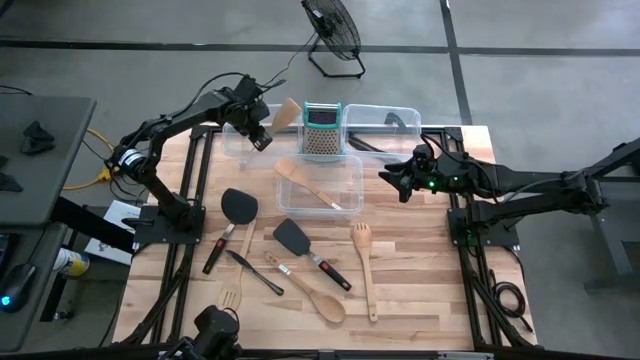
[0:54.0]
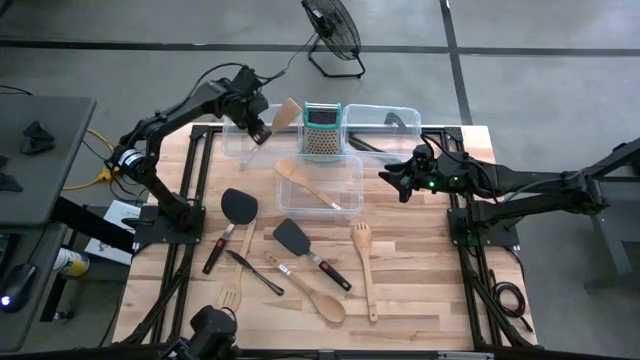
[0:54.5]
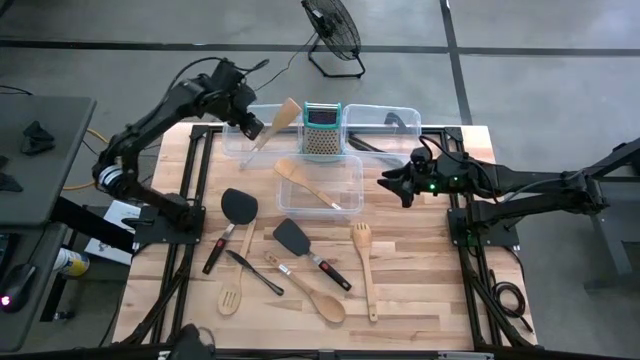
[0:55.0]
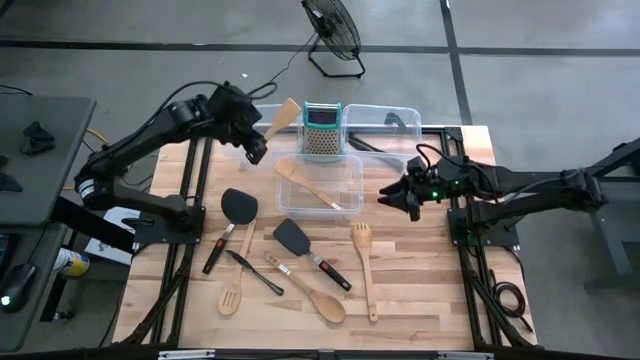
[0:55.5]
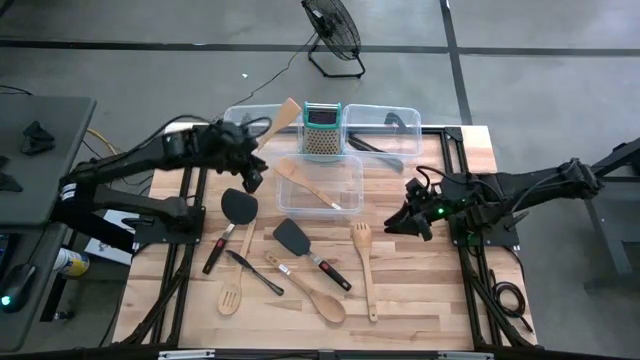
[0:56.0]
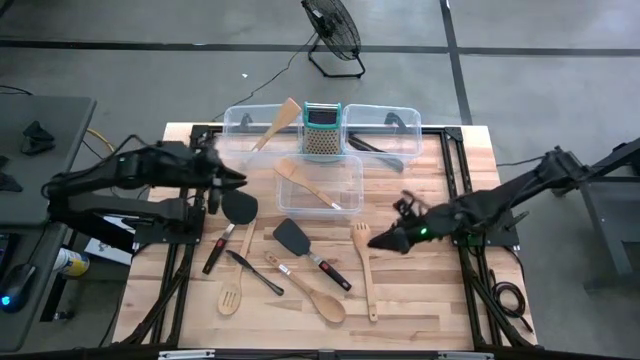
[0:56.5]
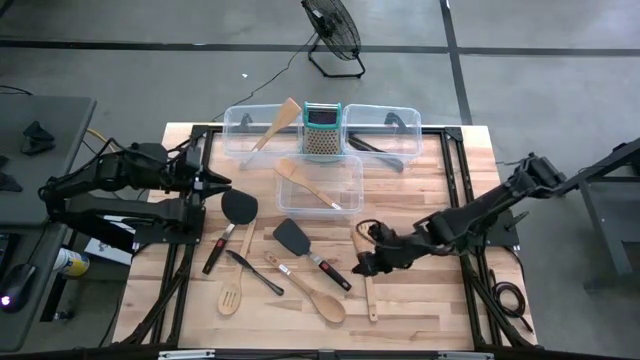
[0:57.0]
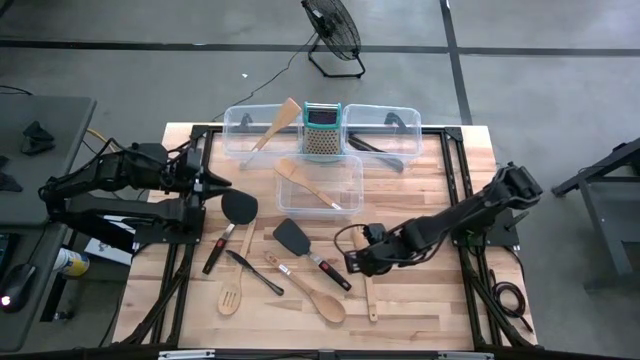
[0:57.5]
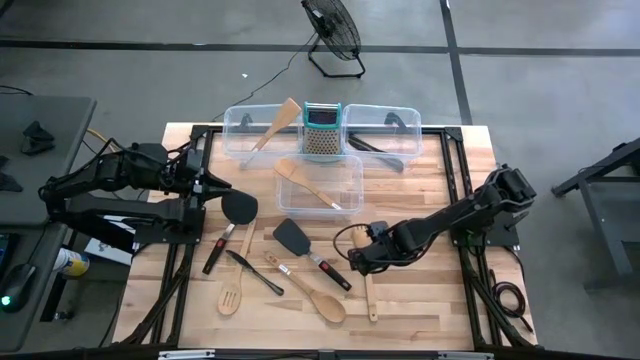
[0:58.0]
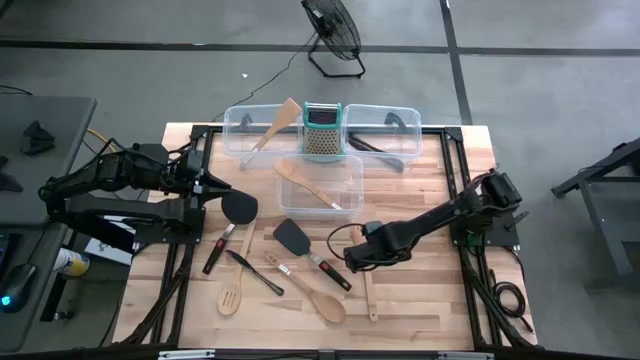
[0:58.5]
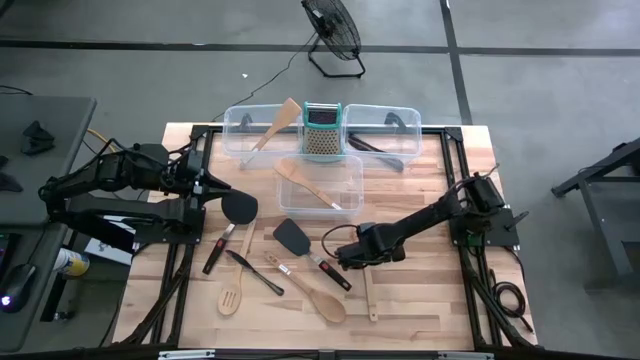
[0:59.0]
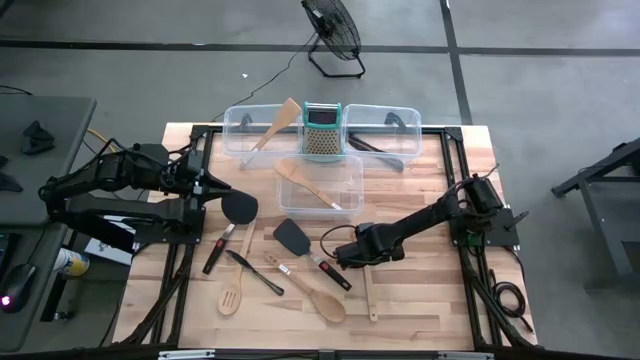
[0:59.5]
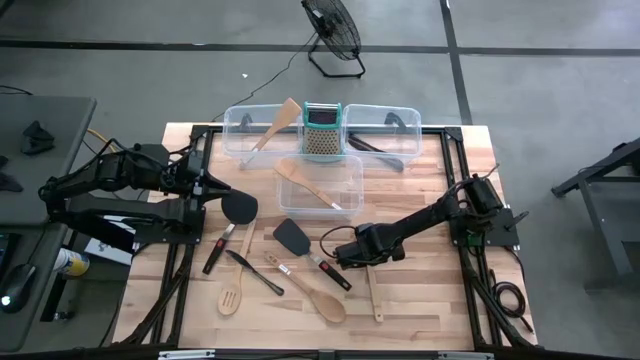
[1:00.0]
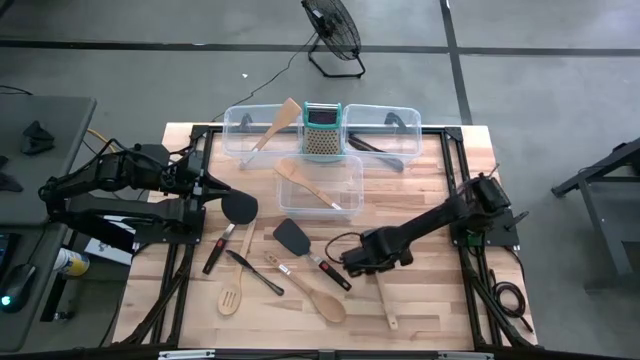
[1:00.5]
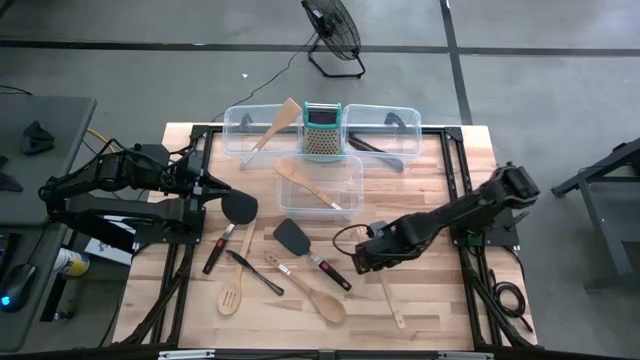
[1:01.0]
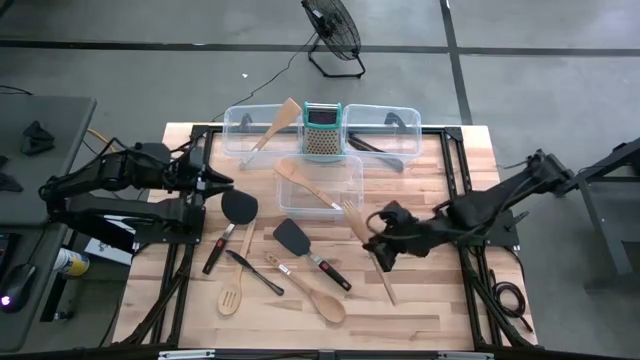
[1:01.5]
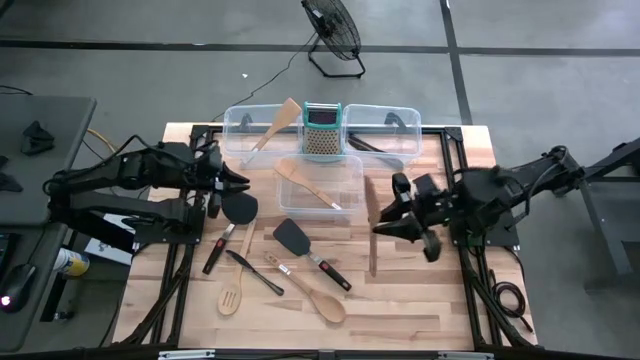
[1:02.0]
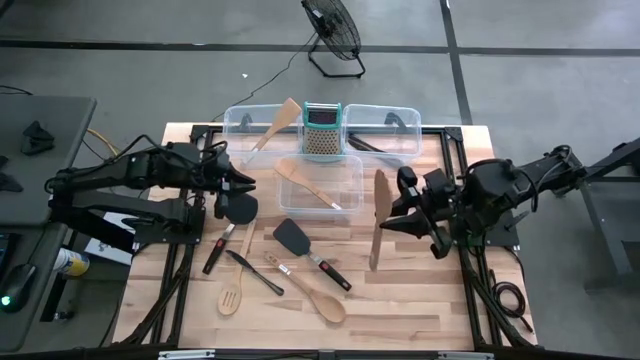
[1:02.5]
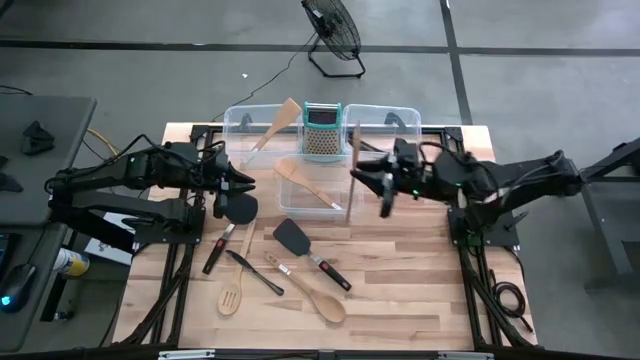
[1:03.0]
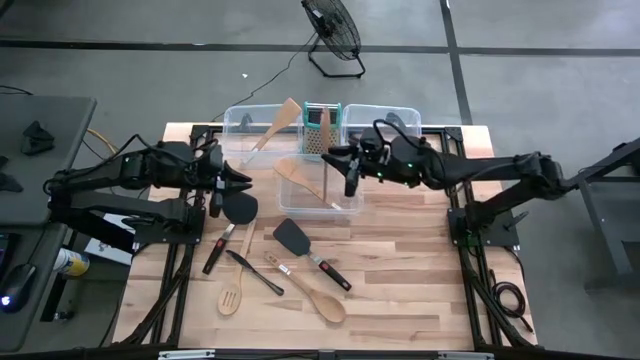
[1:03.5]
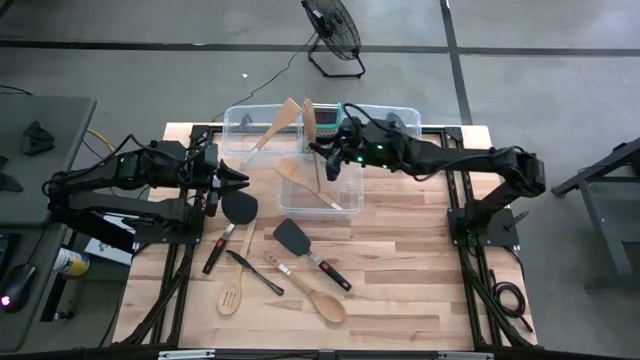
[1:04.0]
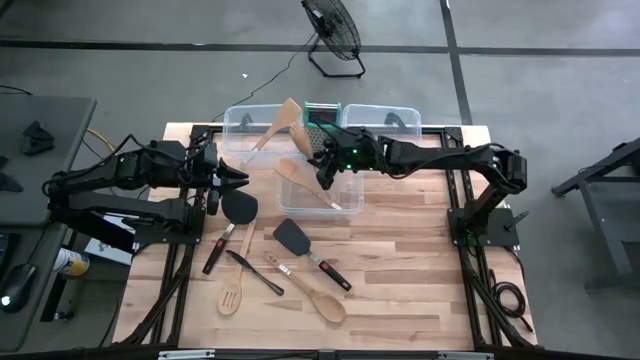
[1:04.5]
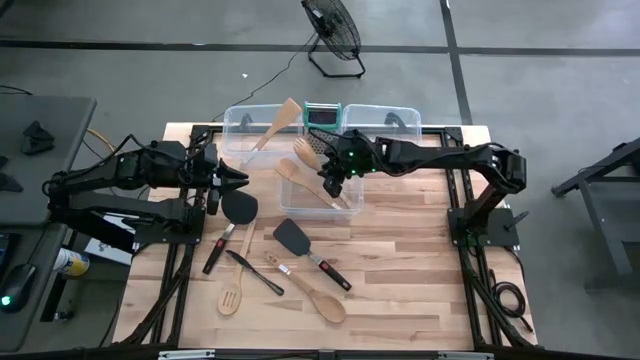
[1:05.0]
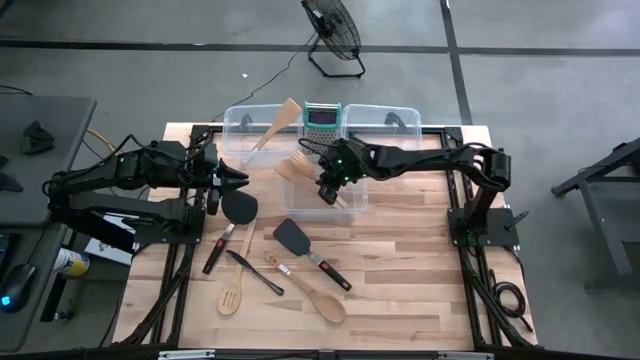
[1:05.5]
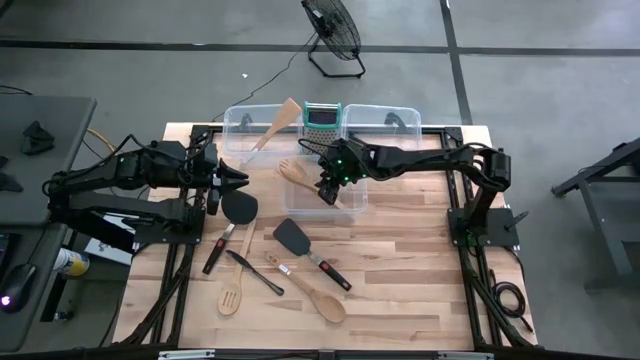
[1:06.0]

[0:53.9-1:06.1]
Task: Pick & Place Kitchen Items
Put the light brown slotted spoon into the middle transparent bin

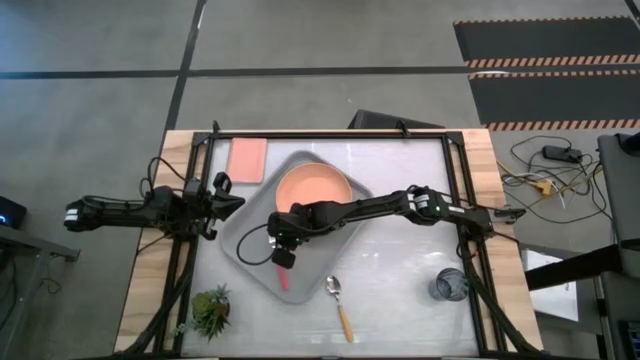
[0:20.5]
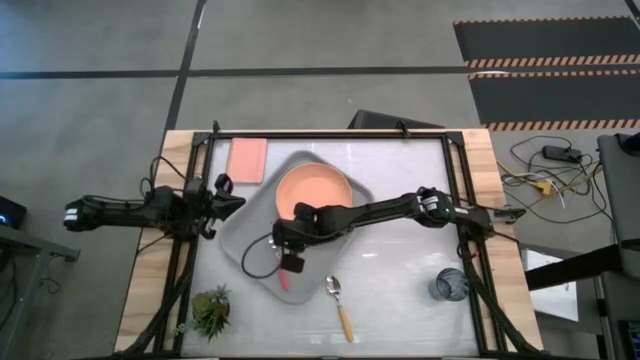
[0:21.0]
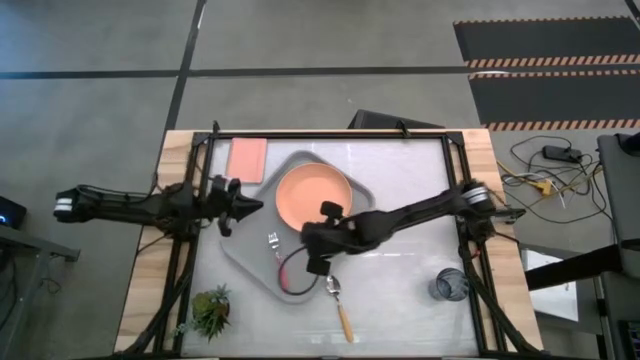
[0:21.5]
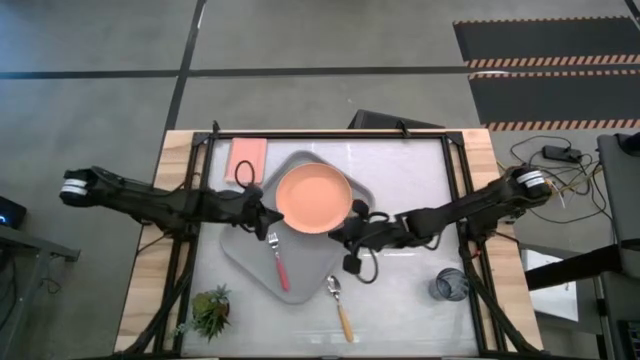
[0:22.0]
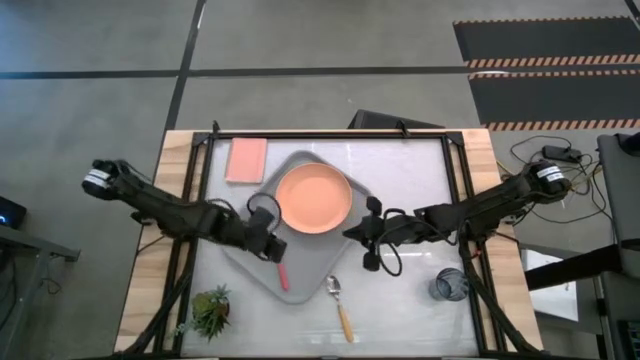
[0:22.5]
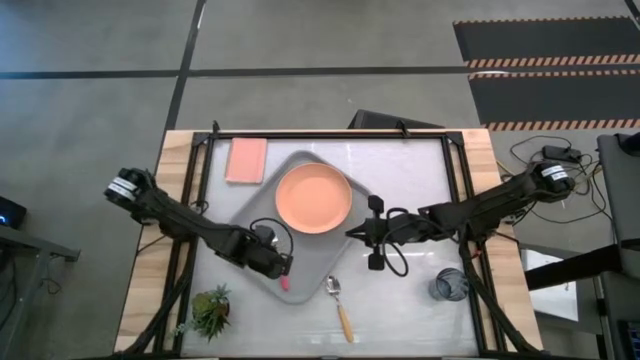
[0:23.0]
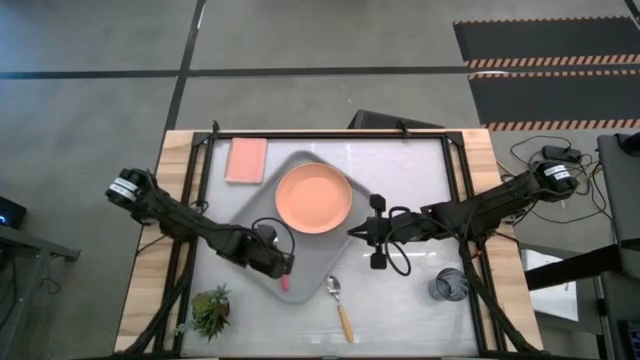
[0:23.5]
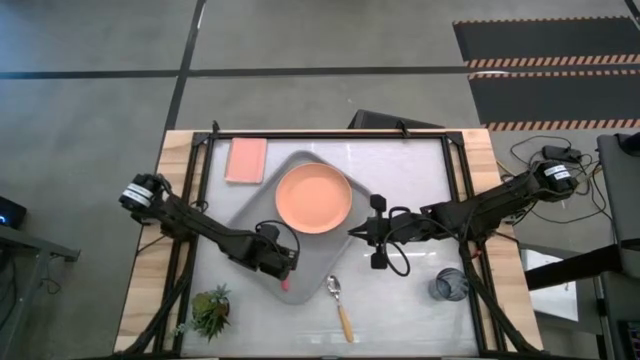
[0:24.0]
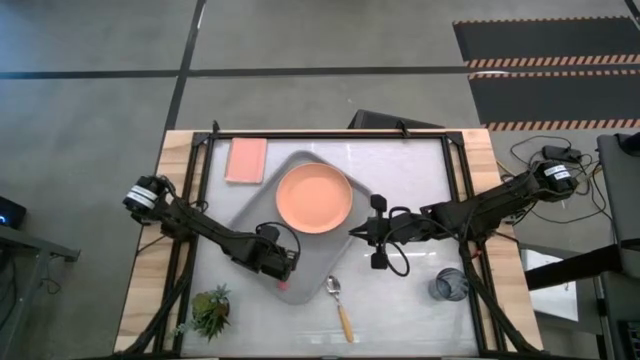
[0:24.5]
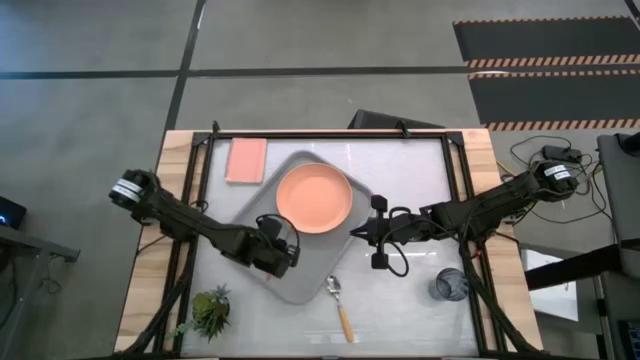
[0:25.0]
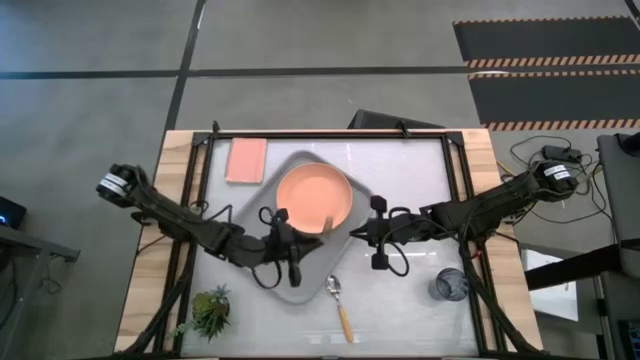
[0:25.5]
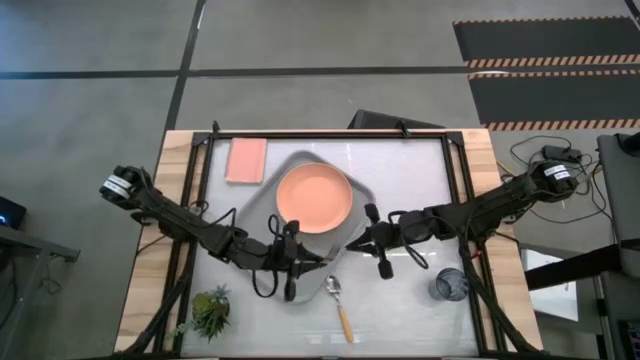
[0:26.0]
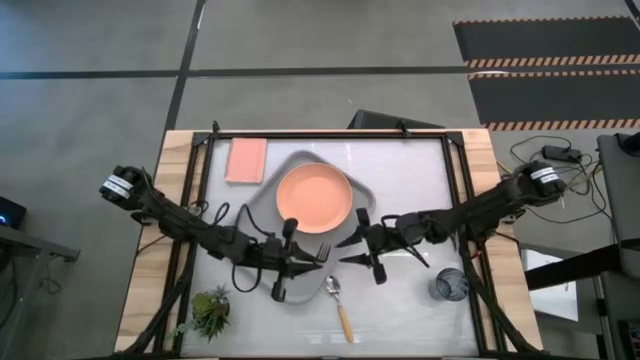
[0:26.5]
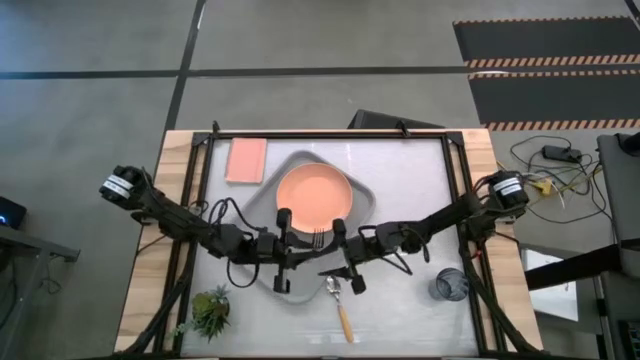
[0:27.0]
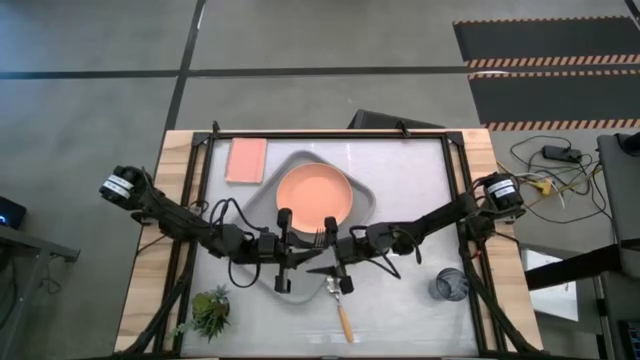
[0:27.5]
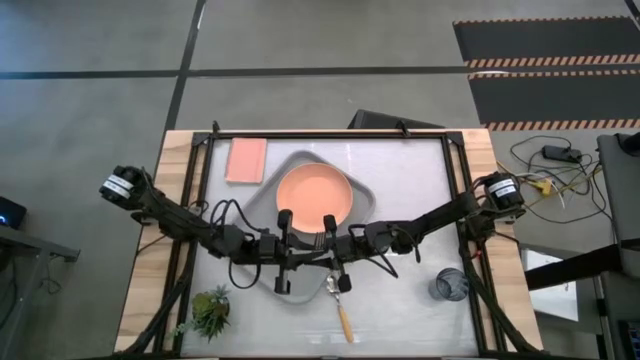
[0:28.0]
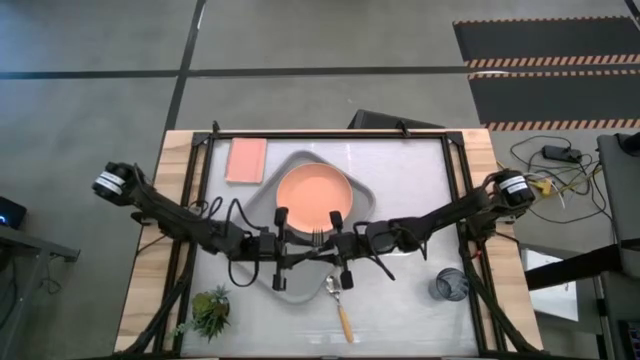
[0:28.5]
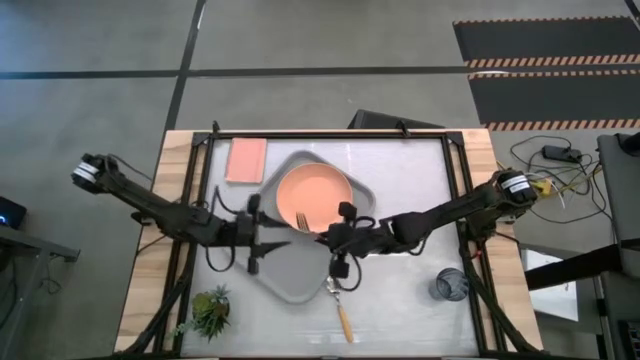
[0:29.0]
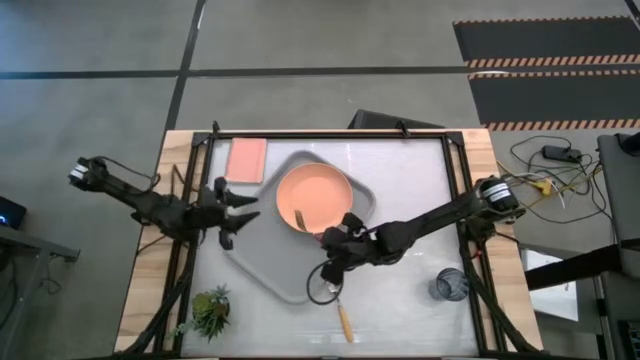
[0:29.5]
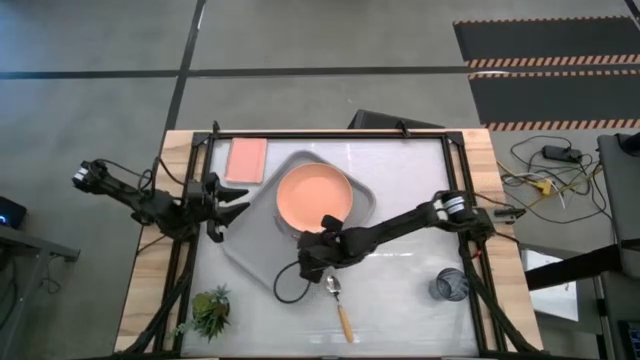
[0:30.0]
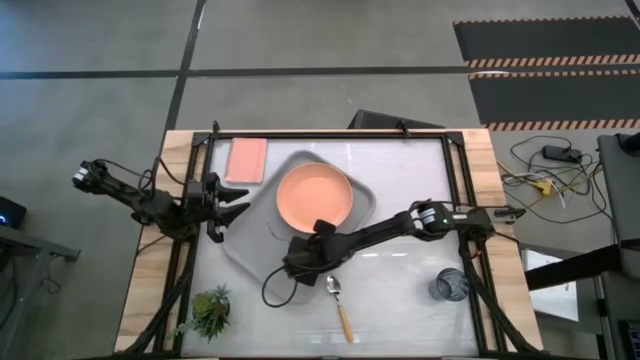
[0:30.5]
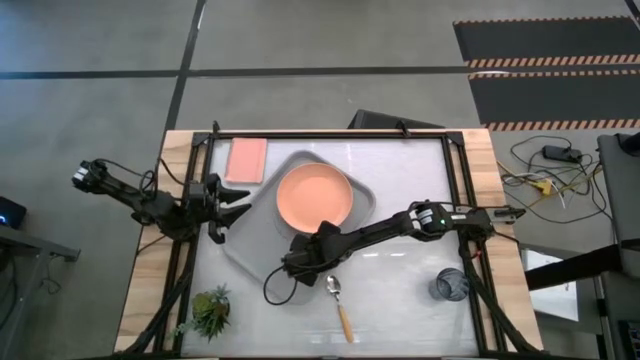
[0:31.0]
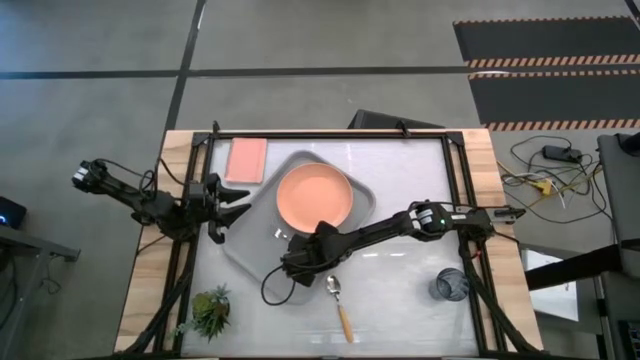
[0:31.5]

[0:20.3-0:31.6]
Task: Pick and place plate/cup/fork/spoon on tray
Put the pink fork on the gray serving tray to the left of the orange plate
